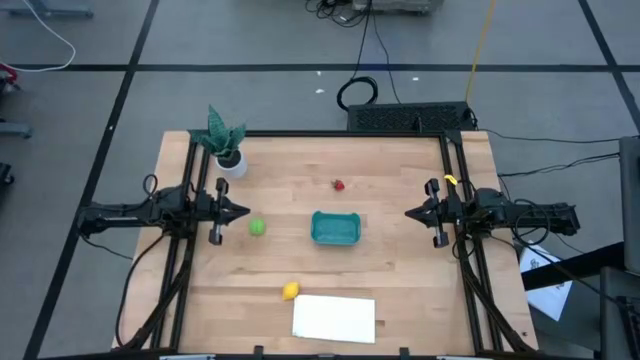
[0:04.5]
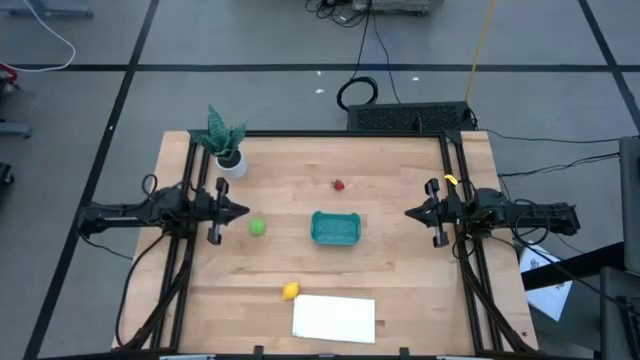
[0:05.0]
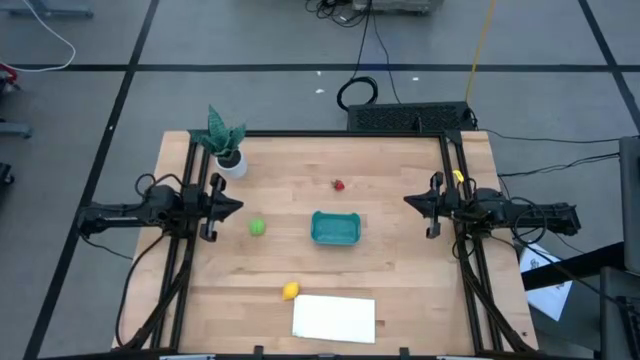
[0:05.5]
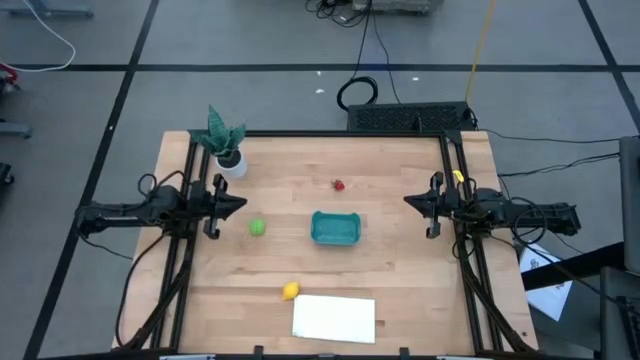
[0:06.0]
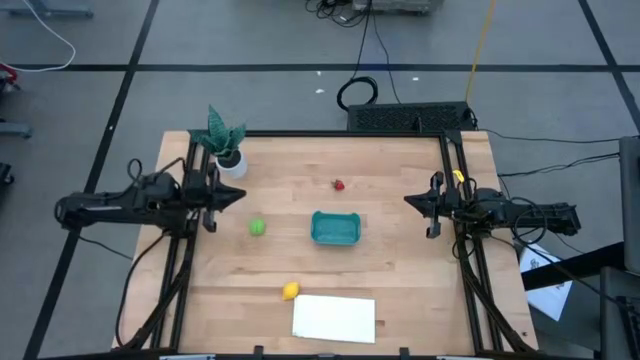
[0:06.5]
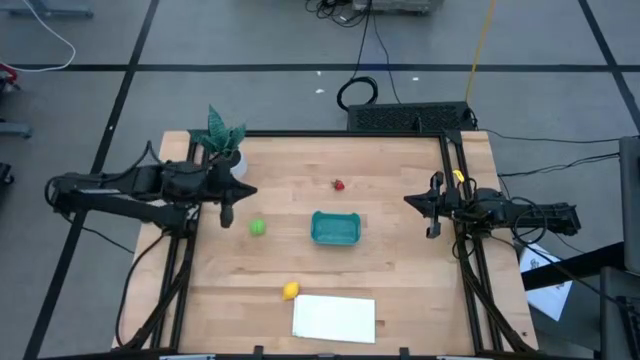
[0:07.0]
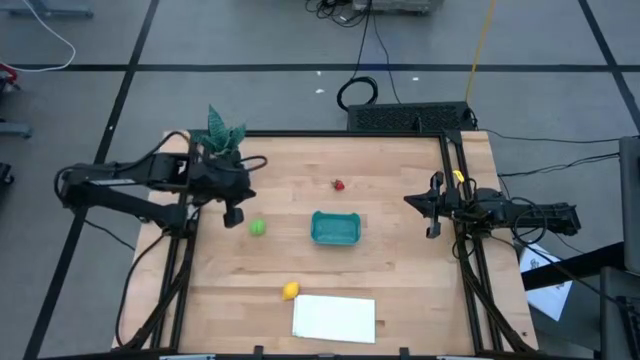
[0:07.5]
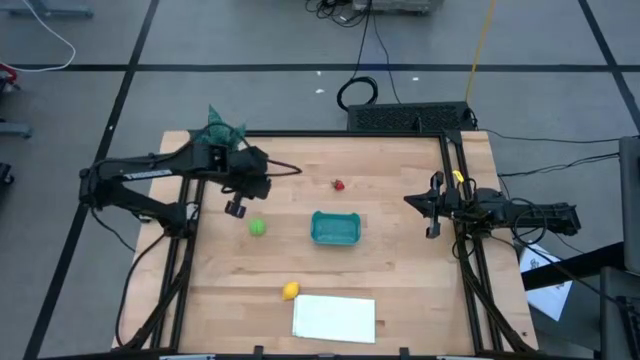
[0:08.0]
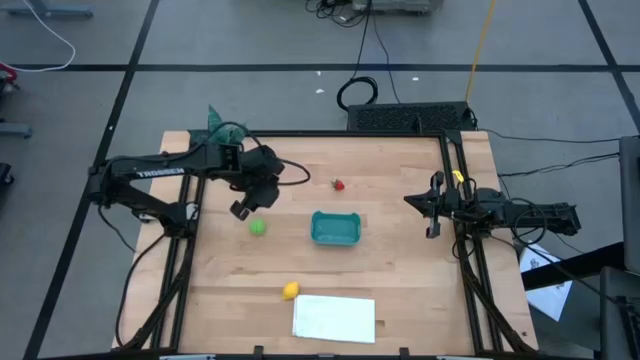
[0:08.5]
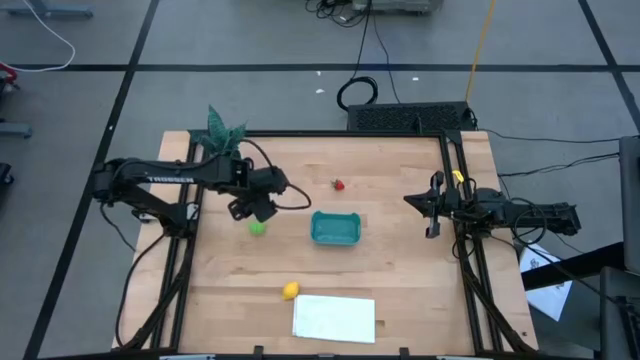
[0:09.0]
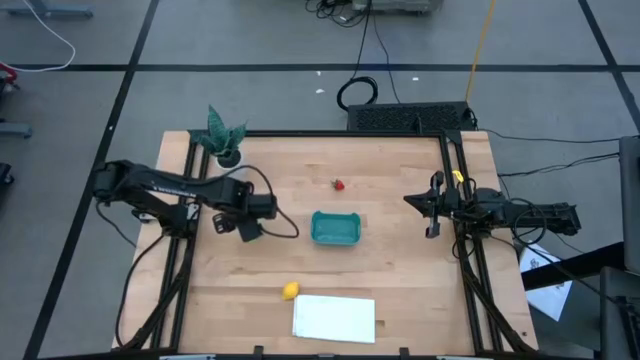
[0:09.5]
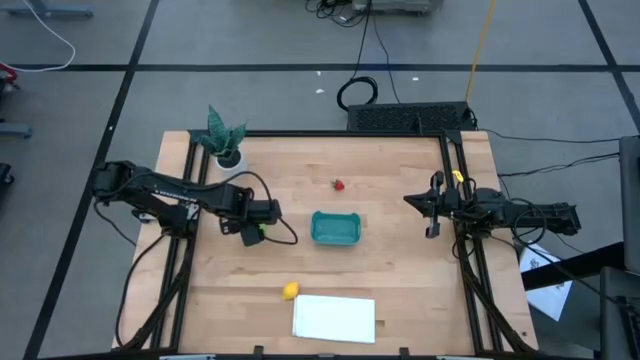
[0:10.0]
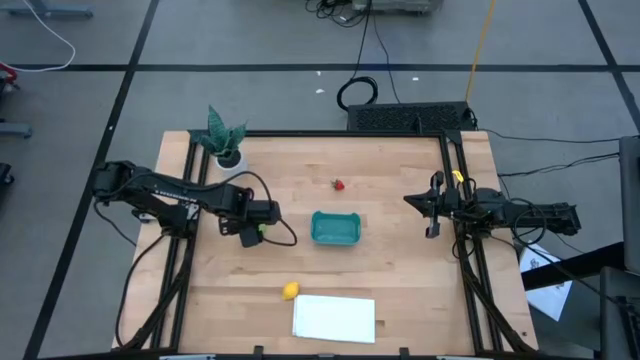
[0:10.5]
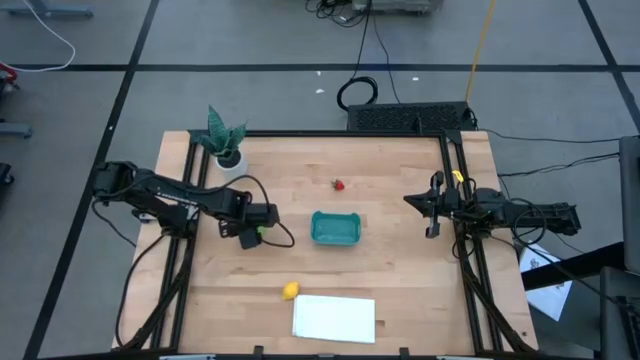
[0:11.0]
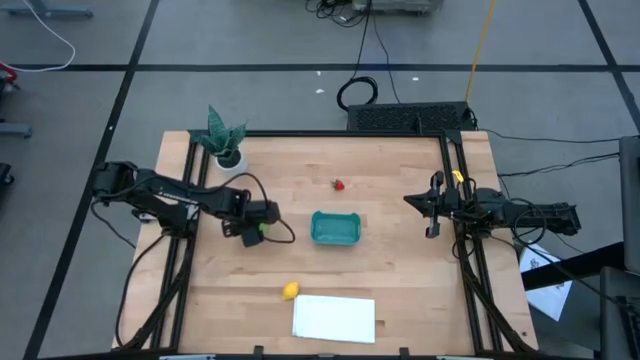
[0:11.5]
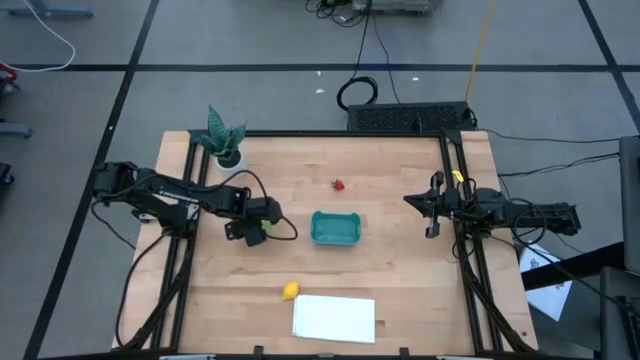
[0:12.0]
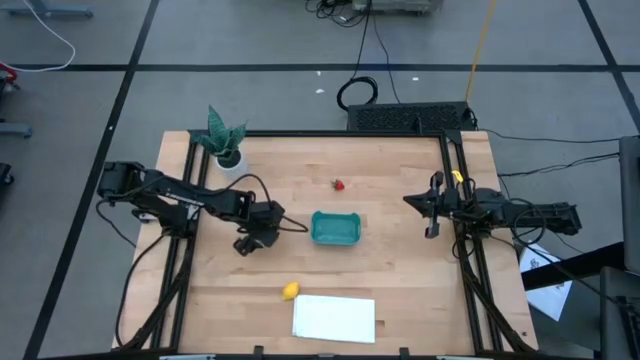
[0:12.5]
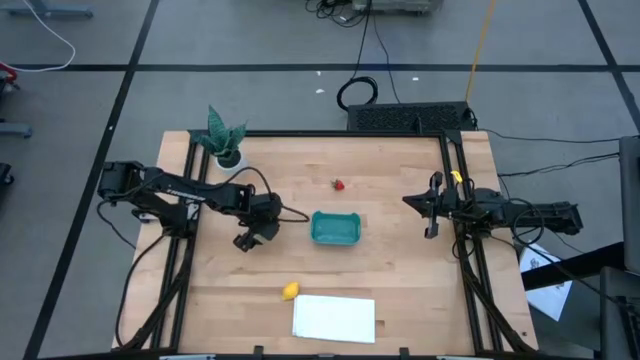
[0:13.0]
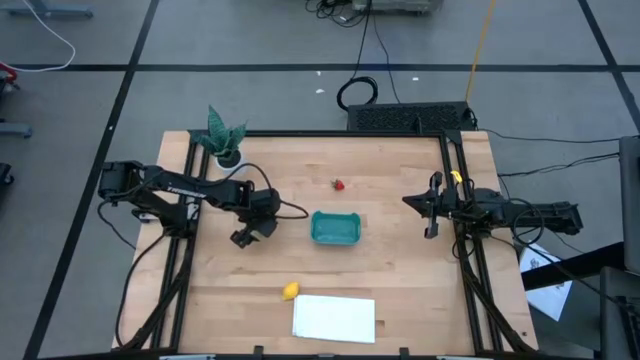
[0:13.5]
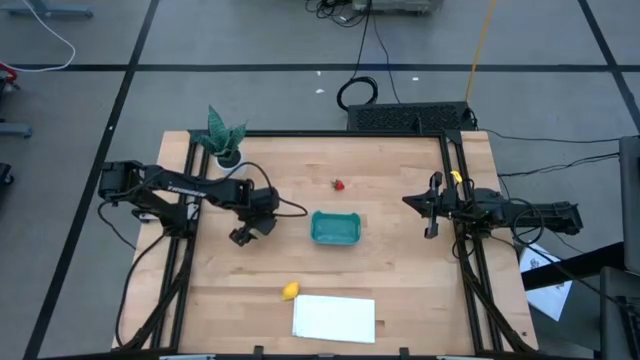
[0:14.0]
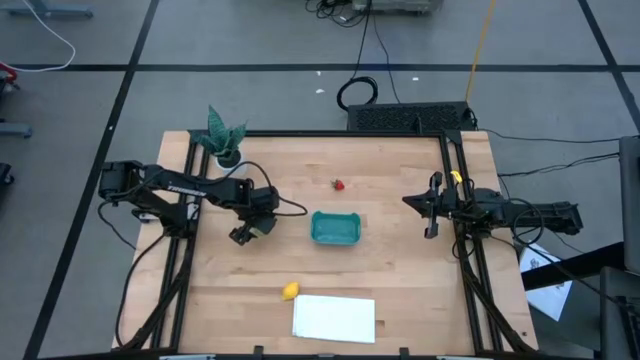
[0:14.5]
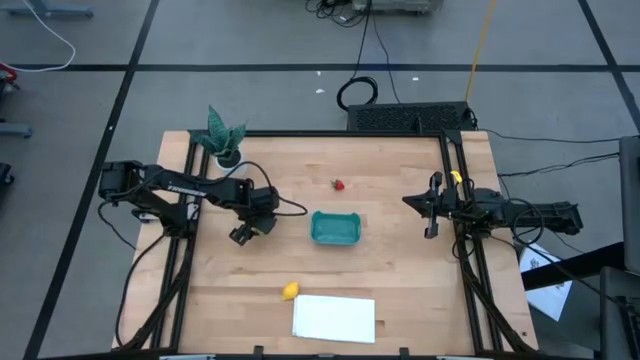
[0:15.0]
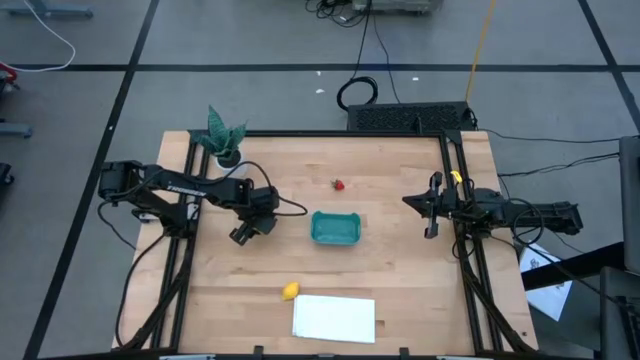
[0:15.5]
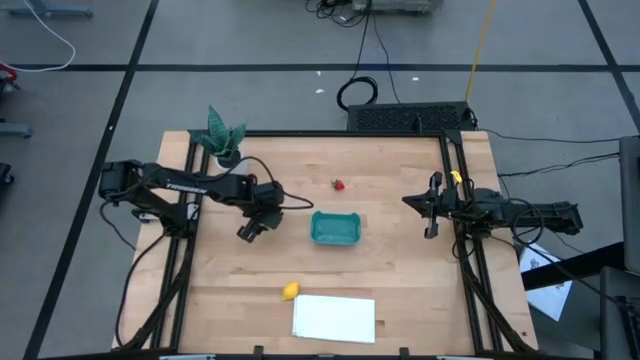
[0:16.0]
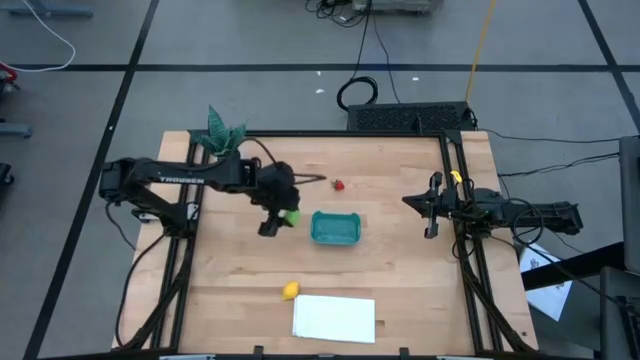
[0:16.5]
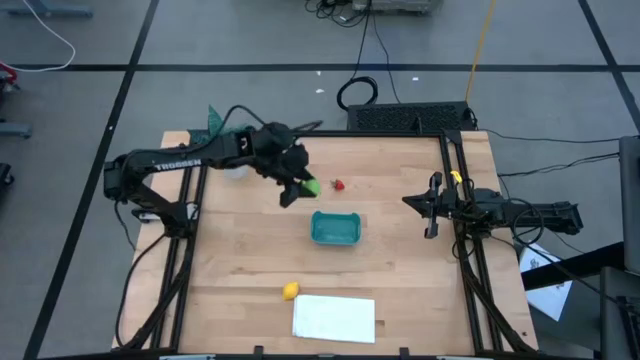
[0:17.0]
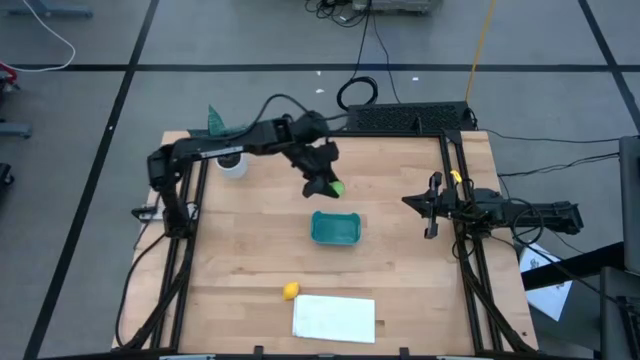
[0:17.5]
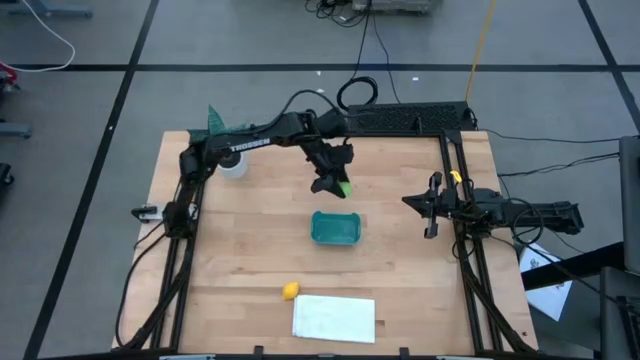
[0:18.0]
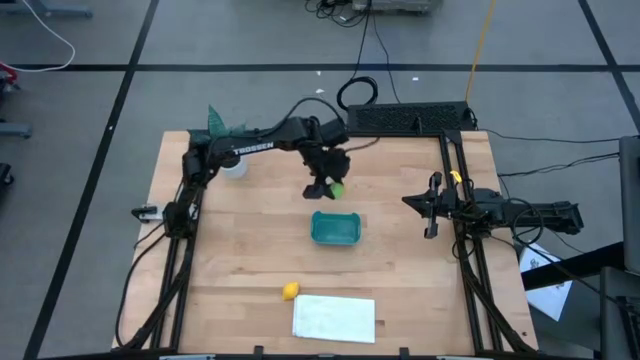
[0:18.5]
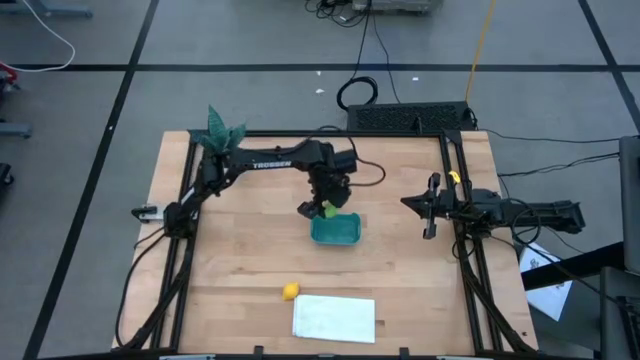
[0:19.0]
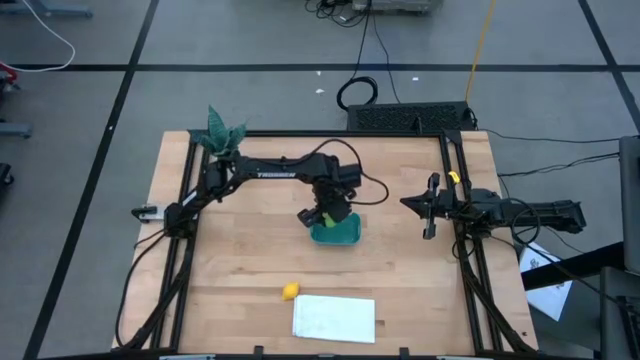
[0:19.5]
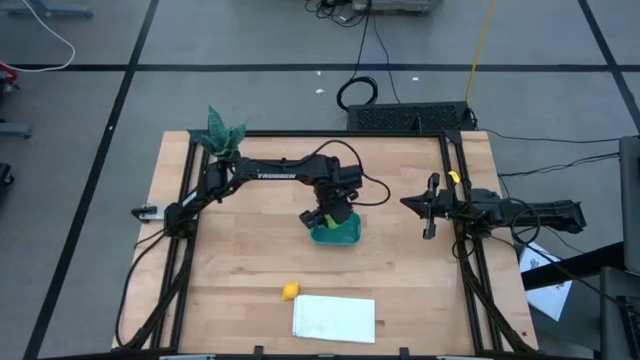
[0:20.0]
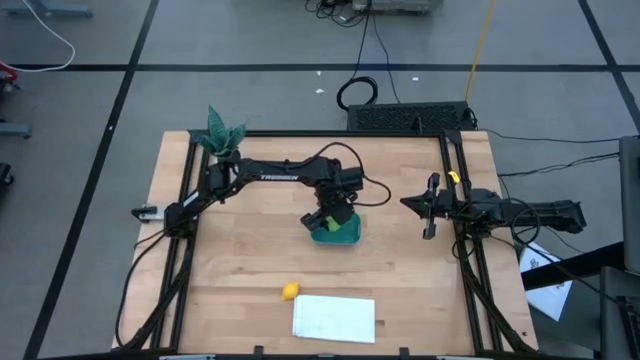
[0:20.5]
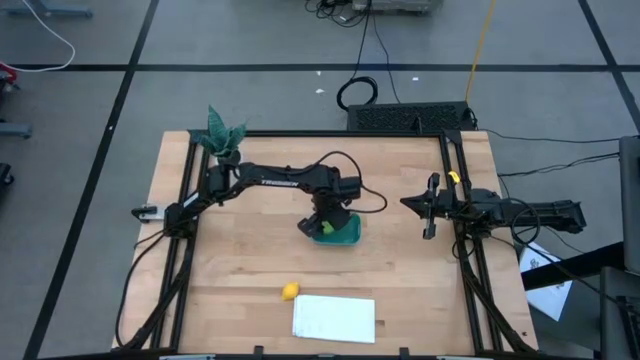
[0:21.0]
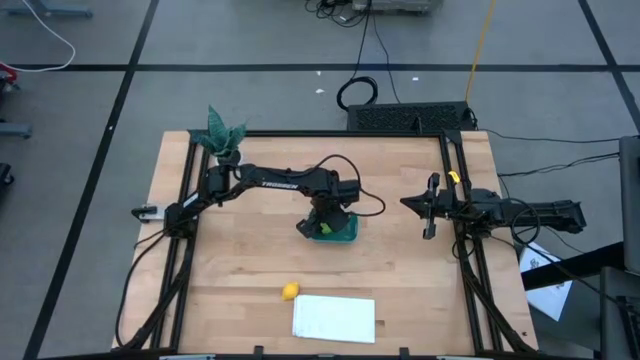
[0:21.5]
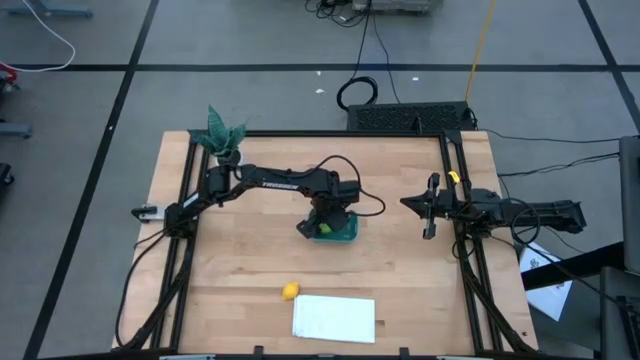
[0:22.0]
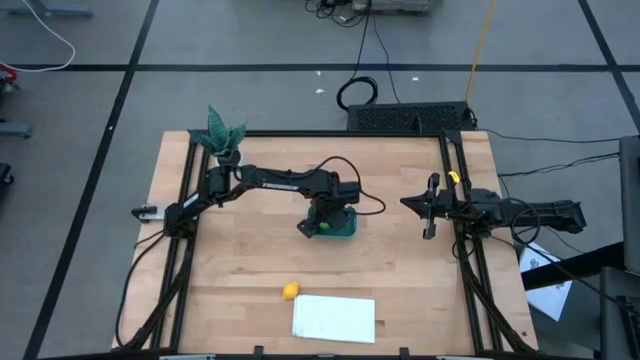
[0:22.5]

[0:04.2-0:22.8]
Task: Pick and placing Produce into tupperware
Put the green cabbage into the green bin

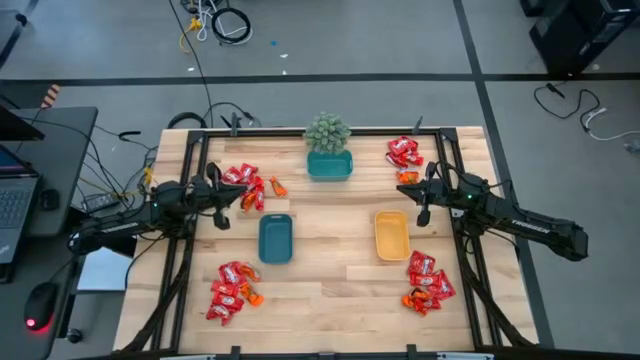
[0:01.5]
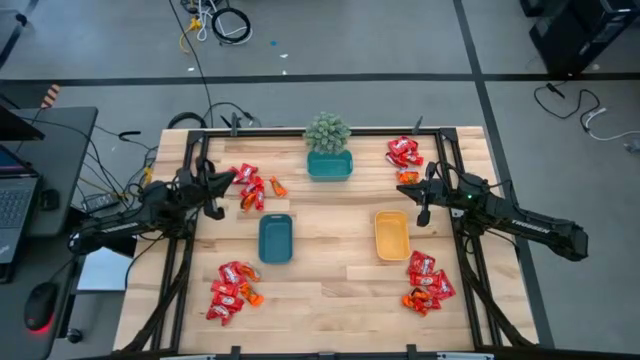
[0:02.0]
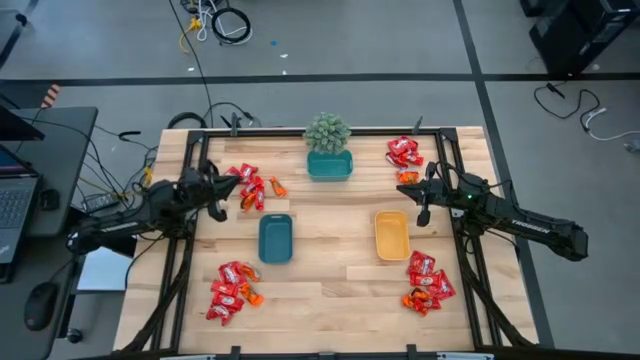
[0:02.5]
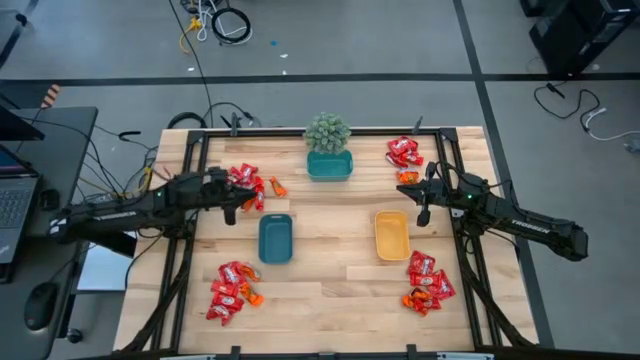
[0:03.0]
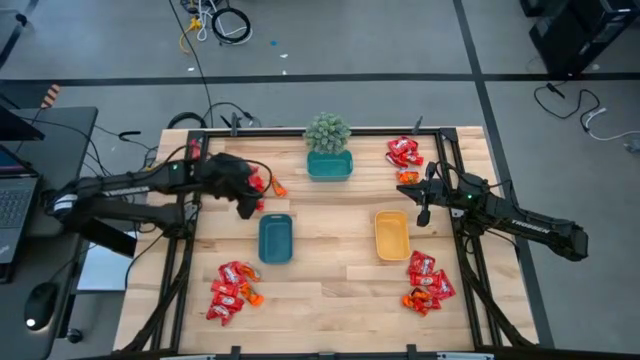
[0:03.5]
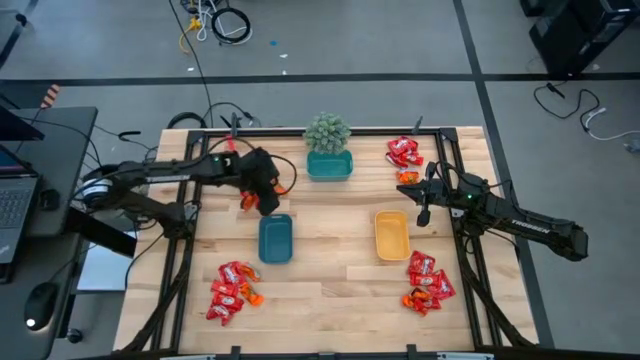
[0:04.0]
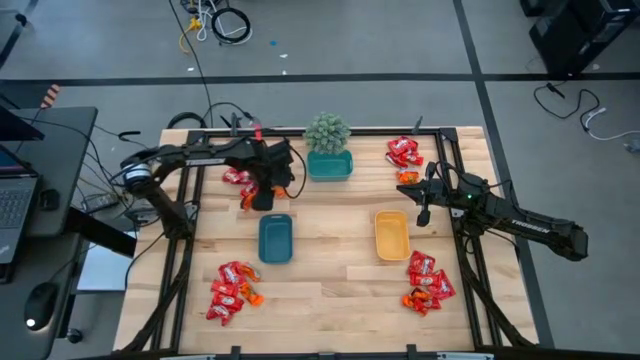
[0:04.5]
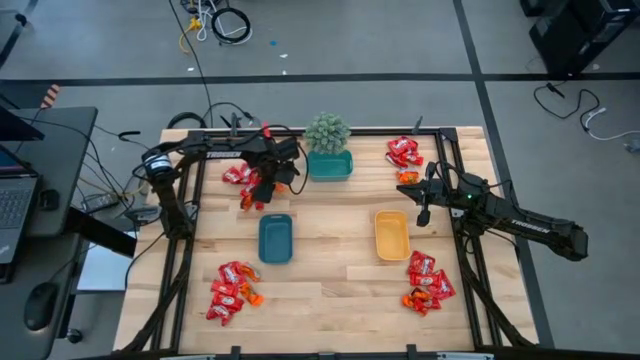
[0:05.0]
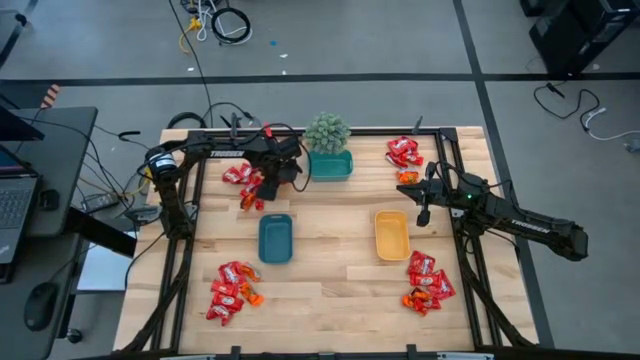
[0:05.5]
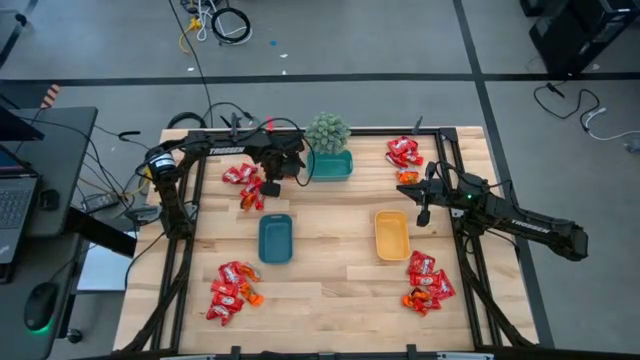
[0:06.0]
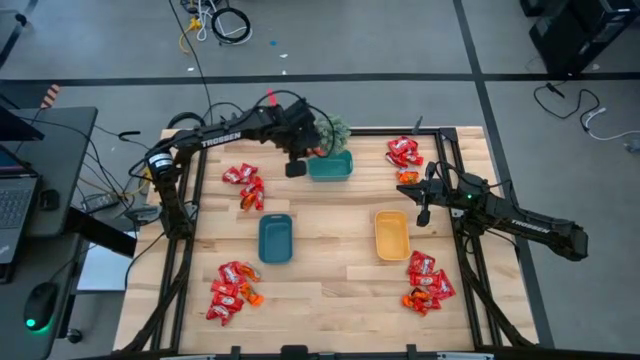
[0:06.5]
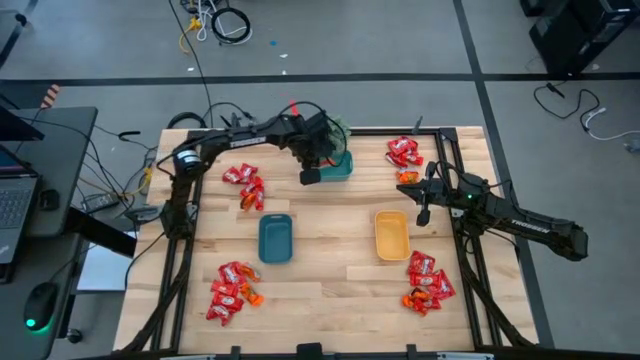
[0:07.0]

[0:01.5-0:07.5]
Task: Sort candy
Put the orange chocolate into the green bin
